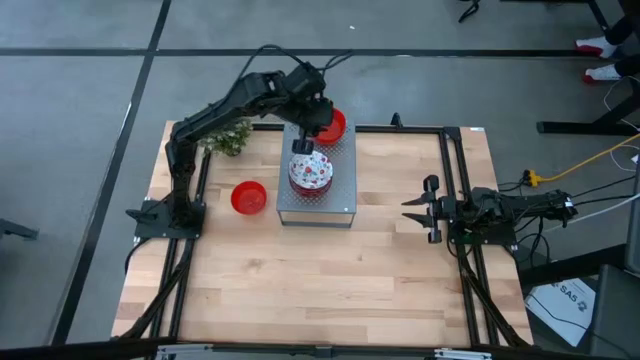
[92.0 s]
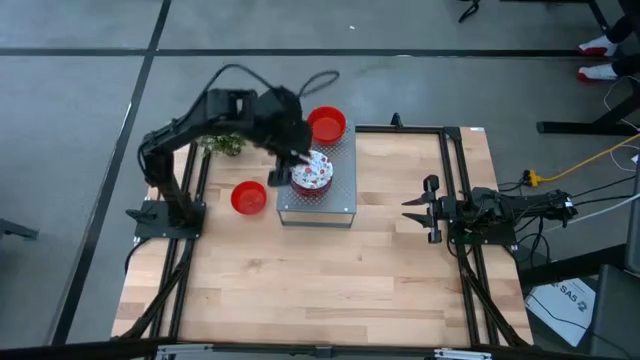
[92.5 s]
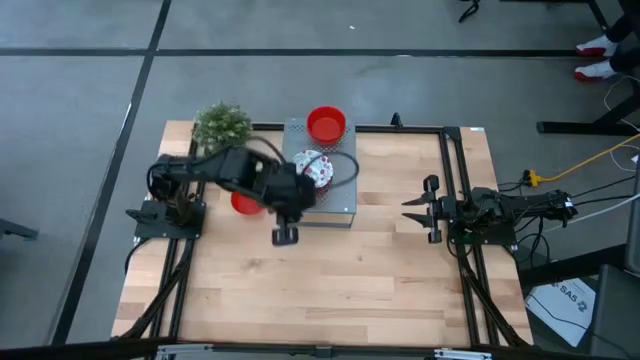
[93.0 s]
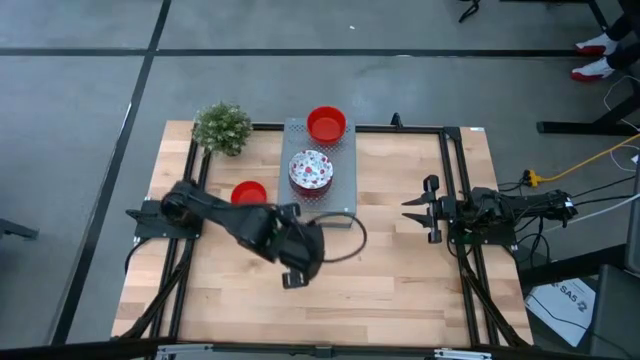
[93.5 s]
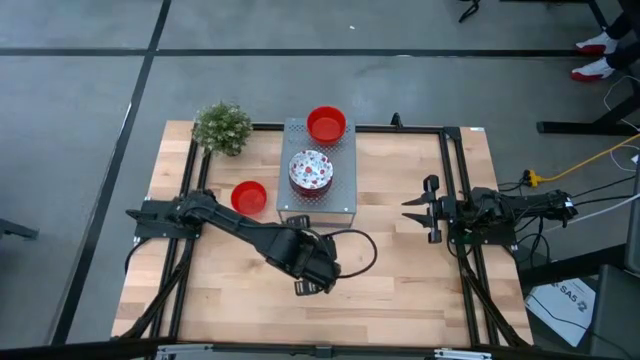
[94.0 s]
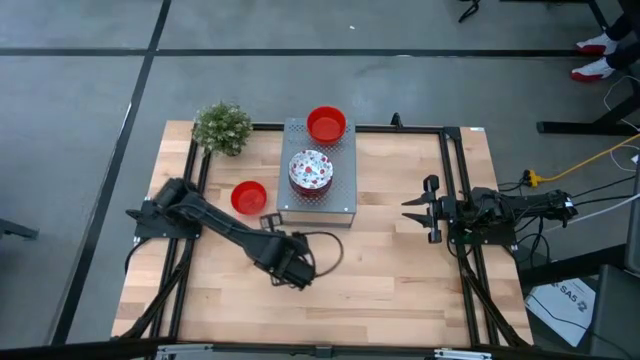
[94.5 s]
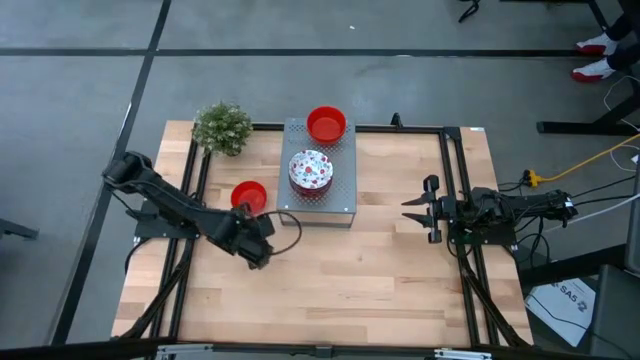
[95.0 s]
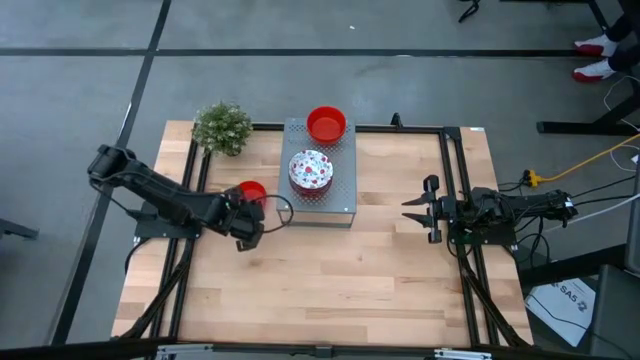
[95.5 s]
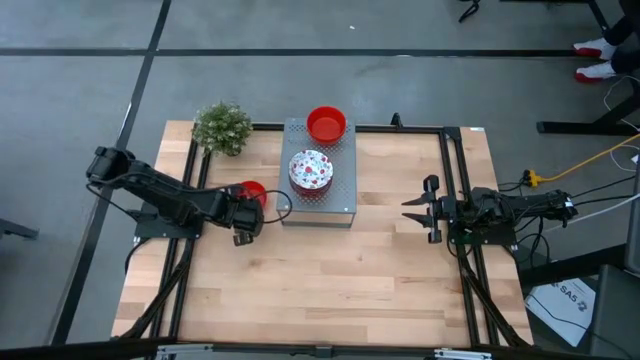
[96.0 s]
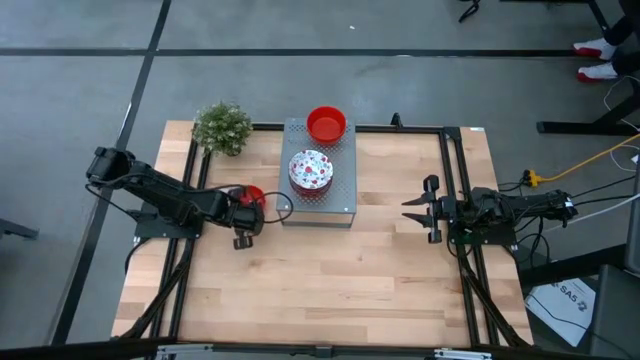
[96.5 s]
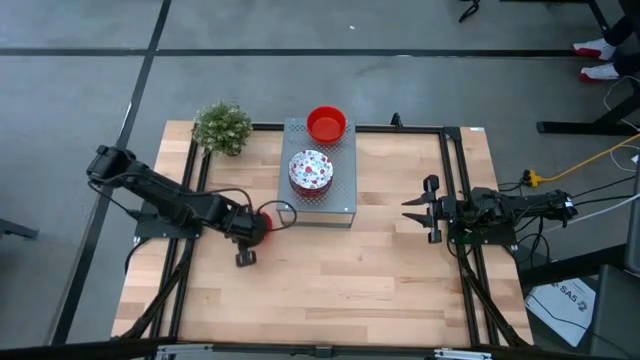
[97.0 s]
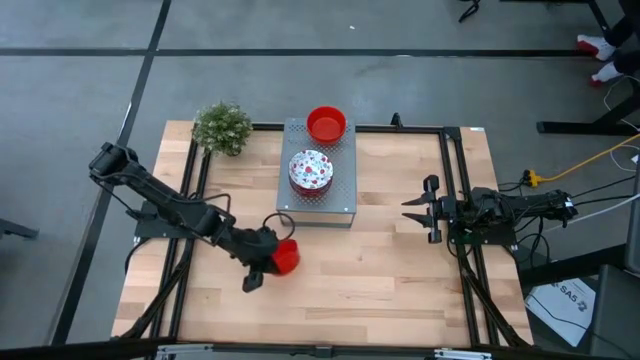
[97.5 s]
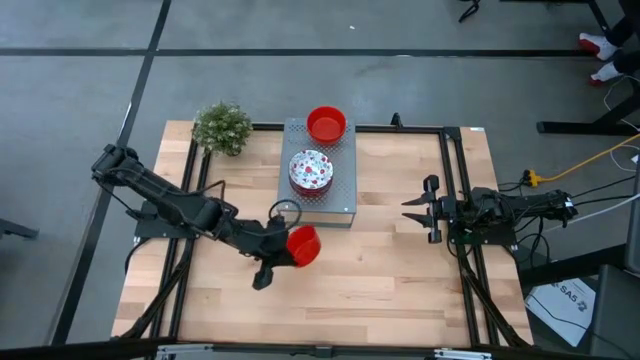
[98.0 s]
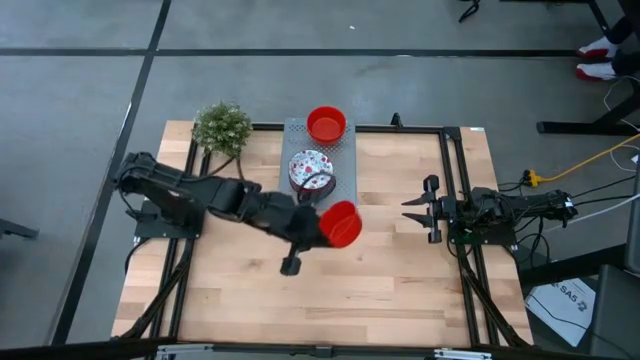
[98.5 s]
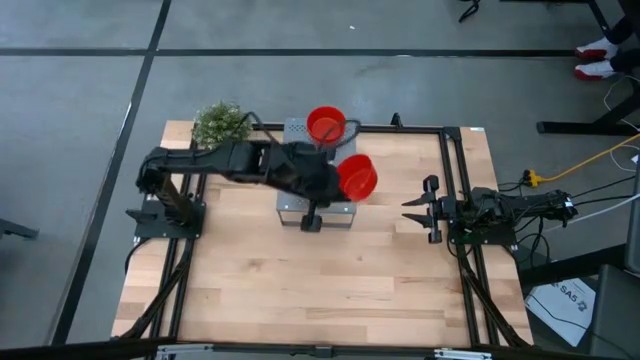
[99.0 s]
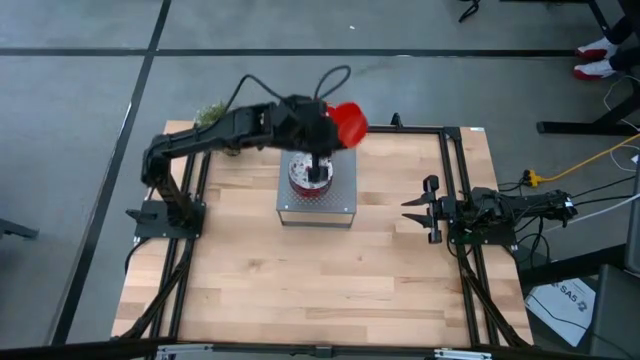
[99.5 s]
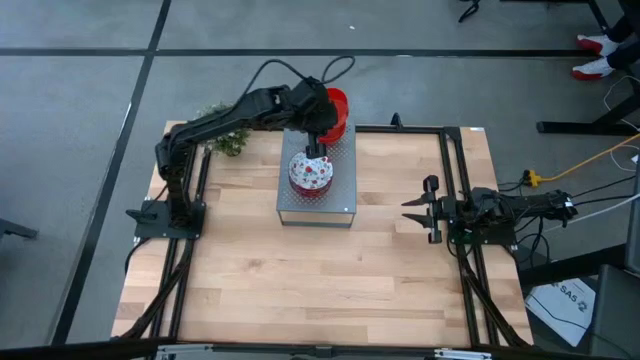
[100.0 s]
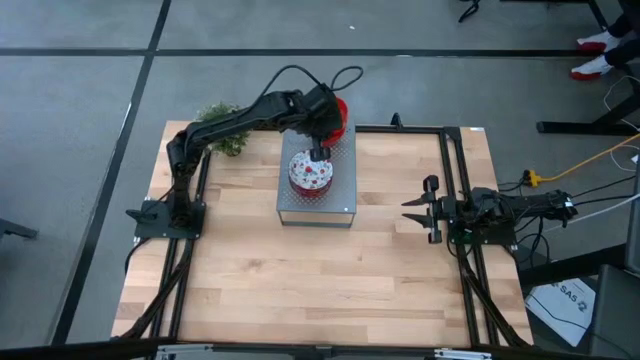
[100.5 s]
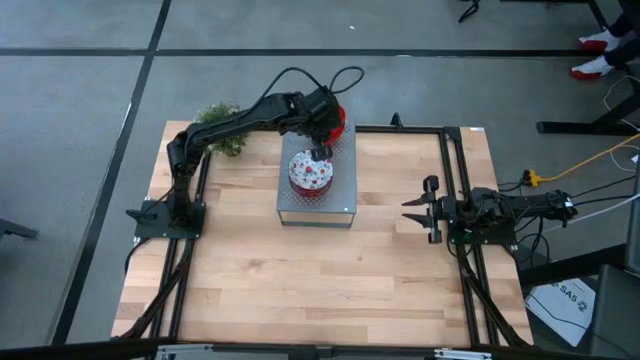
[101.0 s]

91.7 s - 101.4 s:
Task: Pick & Place Mini bowls
Stack the red bowl on the red bowl on the shelf

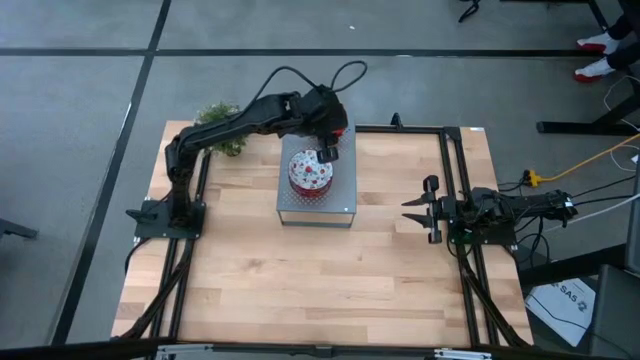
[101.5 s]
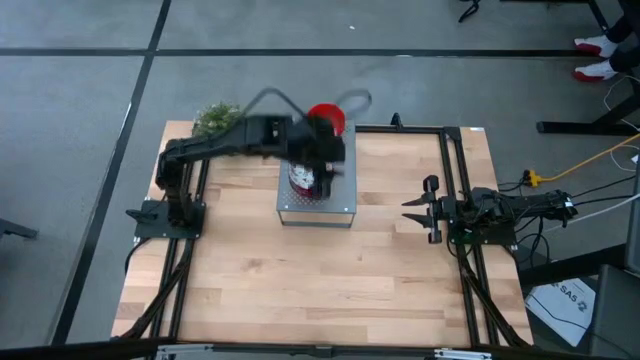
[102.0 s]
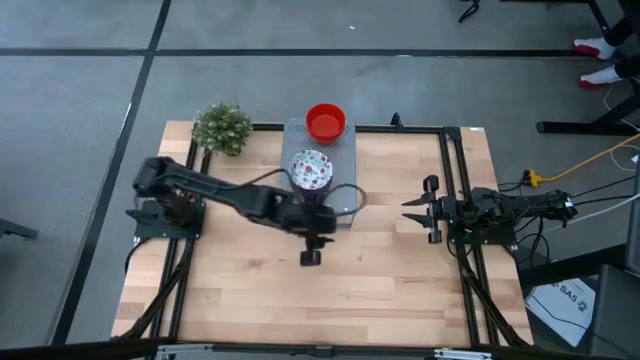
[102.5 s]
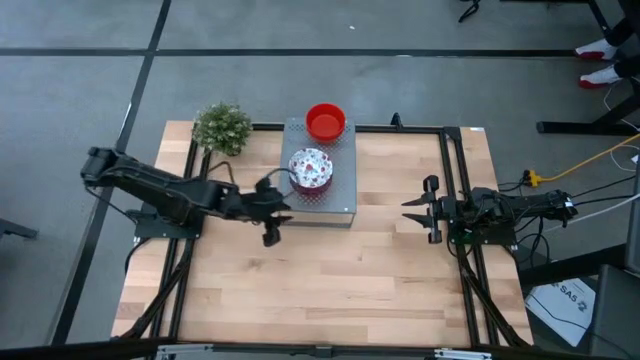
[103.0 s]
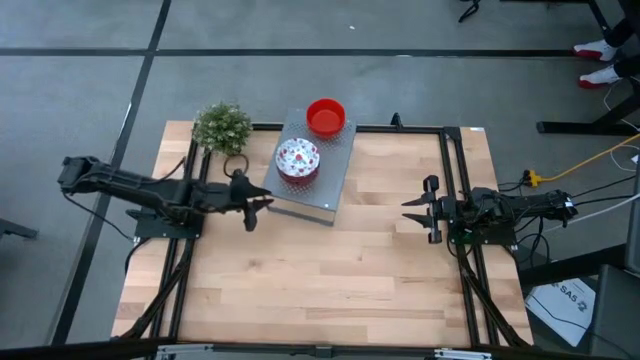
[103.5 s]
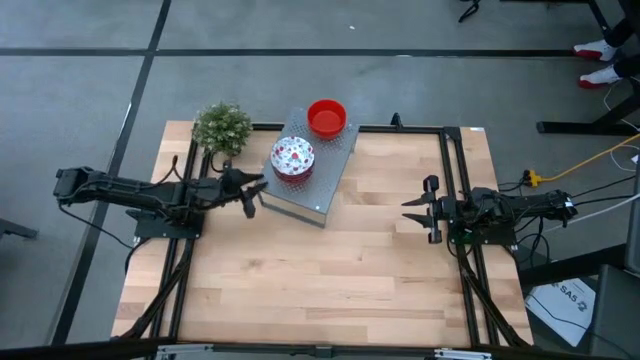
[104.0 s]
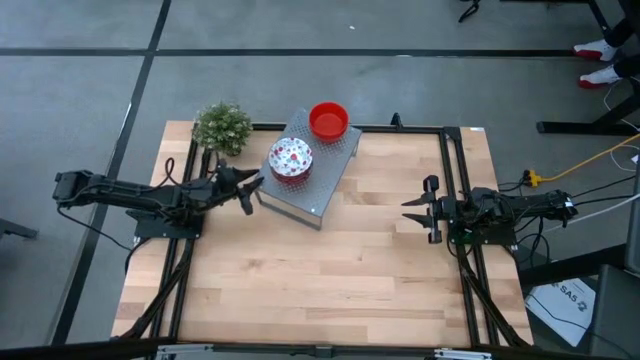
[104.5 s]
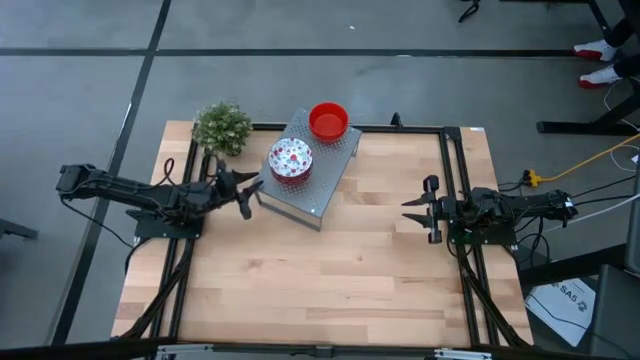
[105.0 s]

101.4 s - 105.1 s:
Adjust the shelf

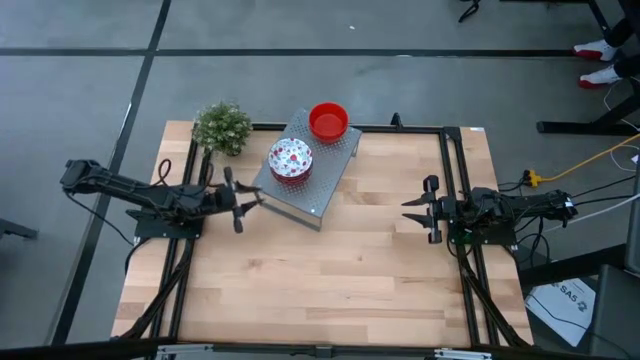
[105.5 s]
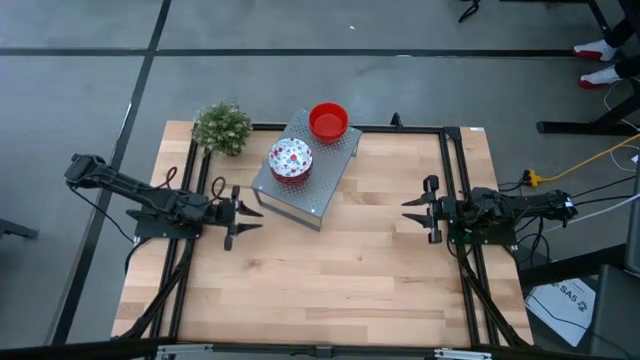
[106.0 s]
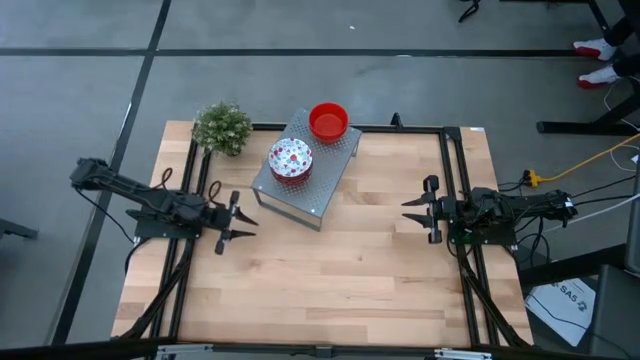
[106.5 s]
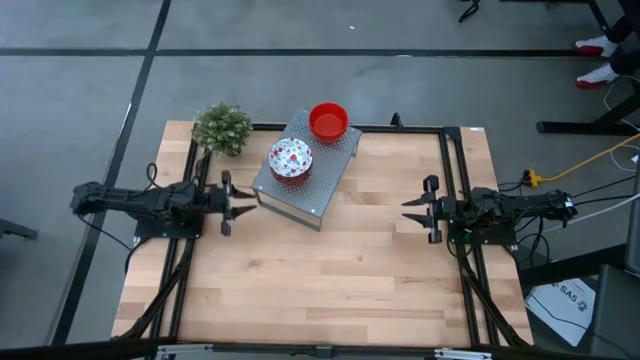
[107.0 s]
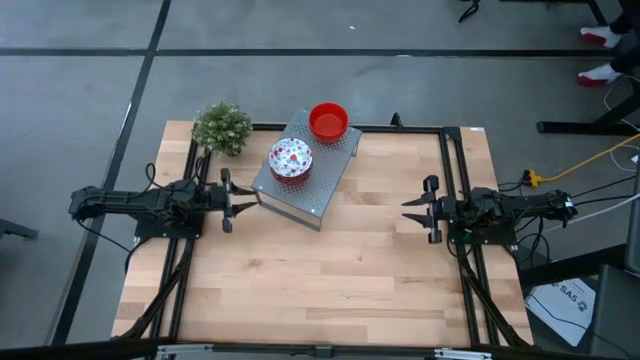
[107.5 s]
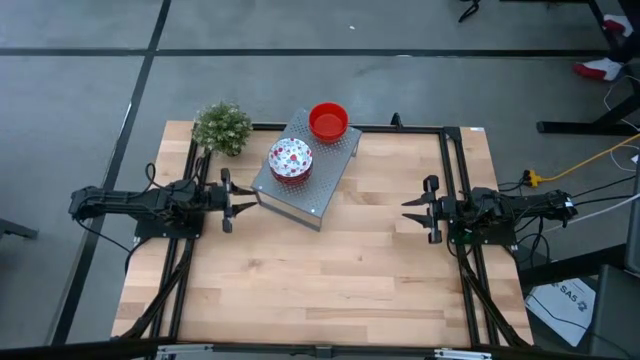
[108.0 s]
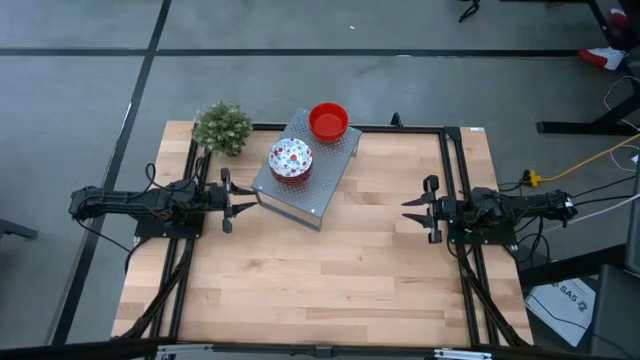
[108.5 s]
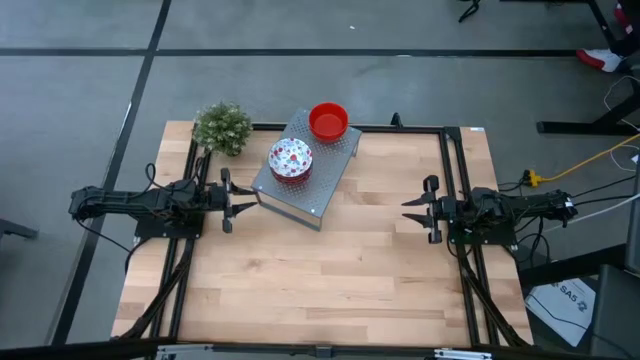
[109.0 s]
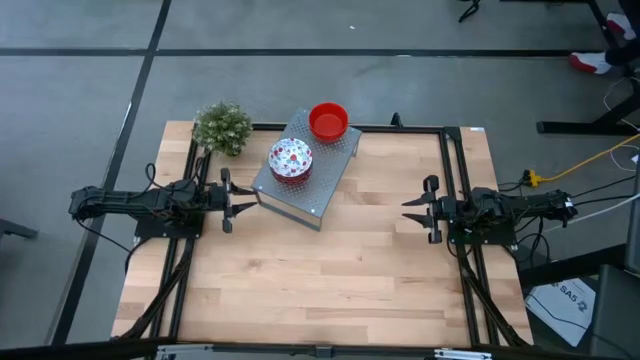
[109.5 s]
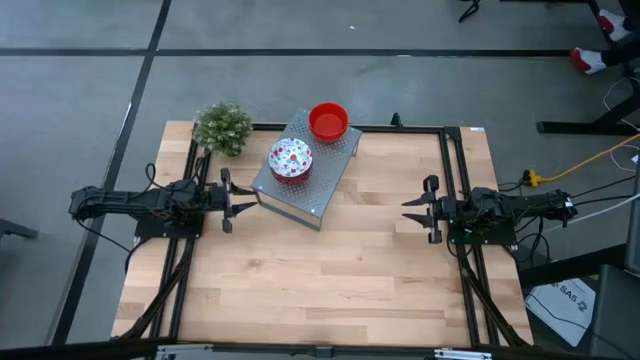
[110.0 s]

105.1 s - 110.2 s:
Return to Home Position

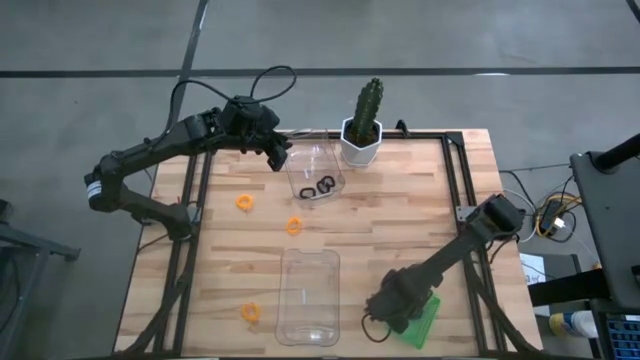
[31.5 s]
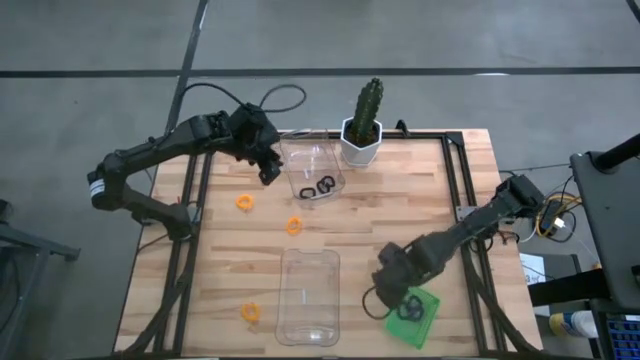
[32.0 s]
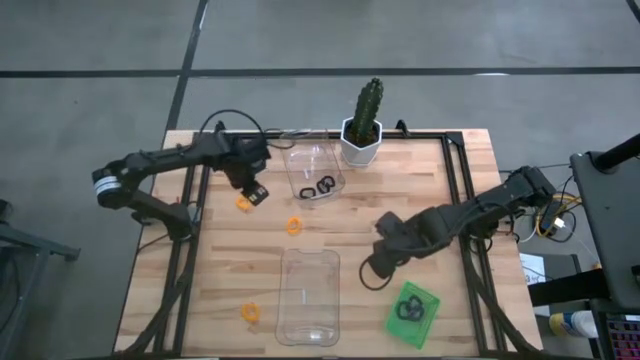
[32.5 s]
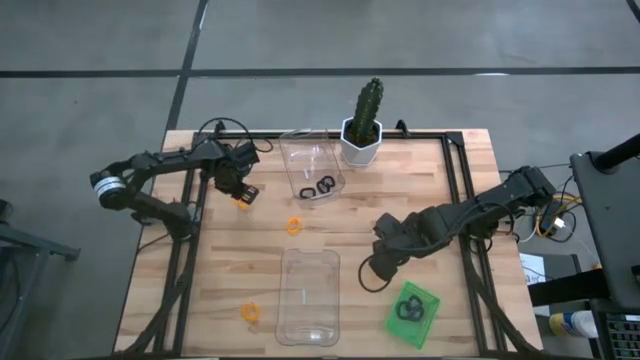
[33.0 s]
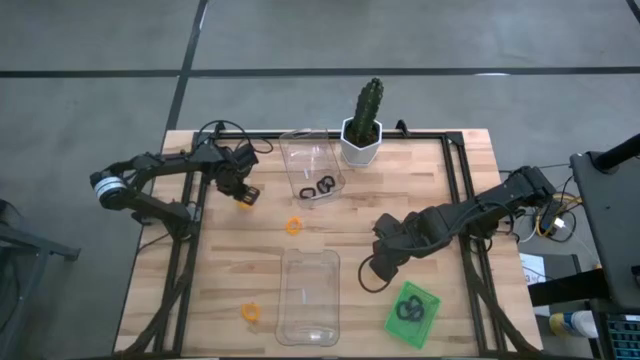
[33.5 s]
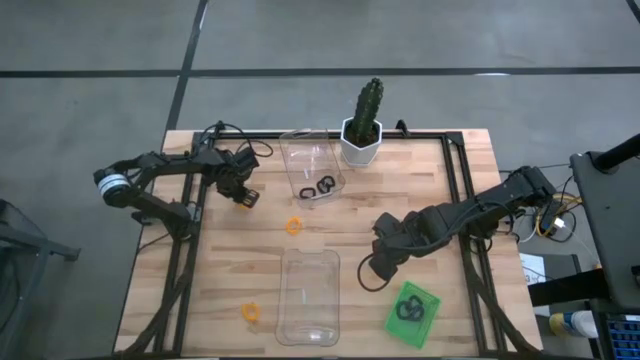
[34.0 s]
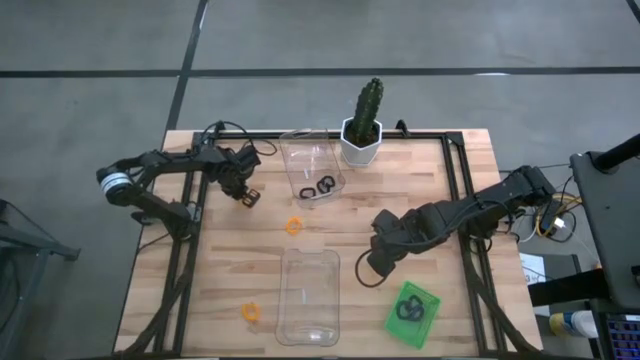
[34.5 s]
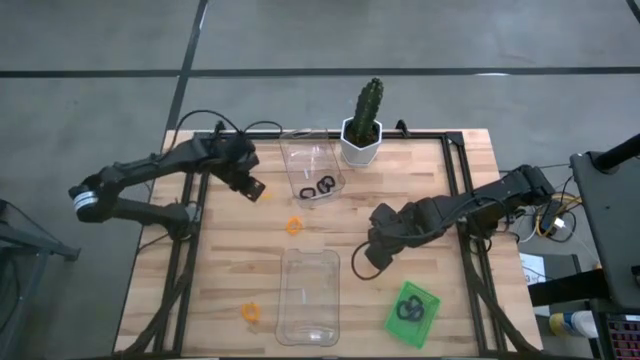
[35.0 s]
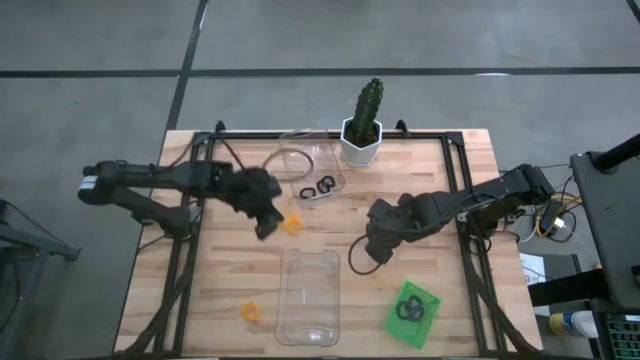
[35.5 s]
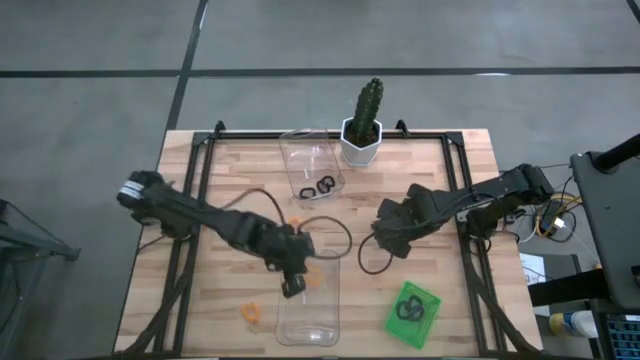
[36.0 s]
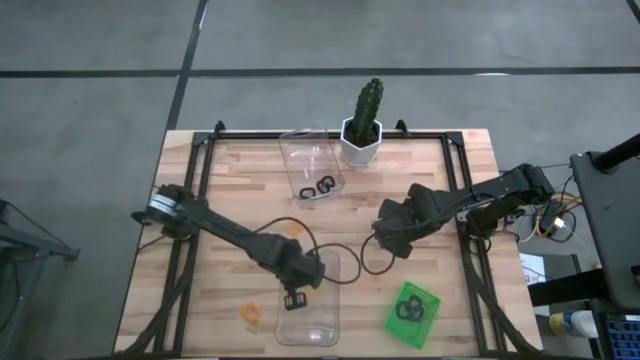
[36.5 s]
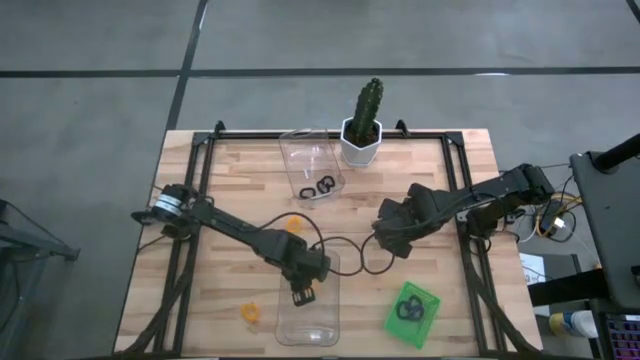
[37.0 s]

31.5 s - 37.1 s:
Task: Sort spring keychains
Put the top left yellow spring keychain into the bottom transparent bin
